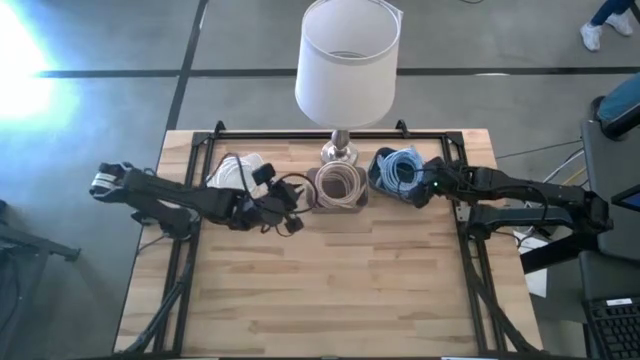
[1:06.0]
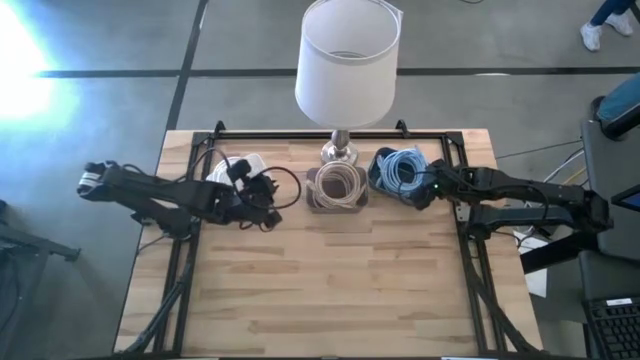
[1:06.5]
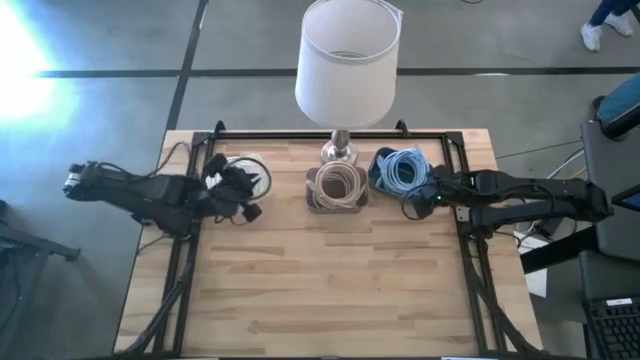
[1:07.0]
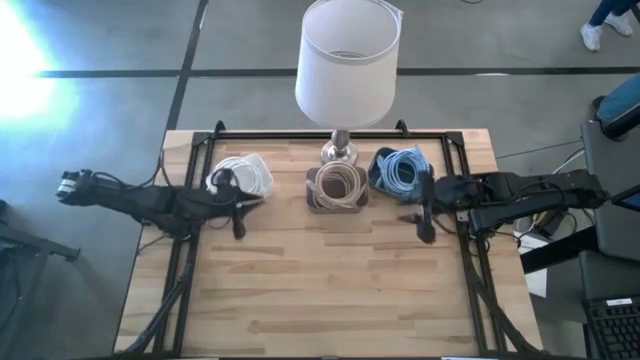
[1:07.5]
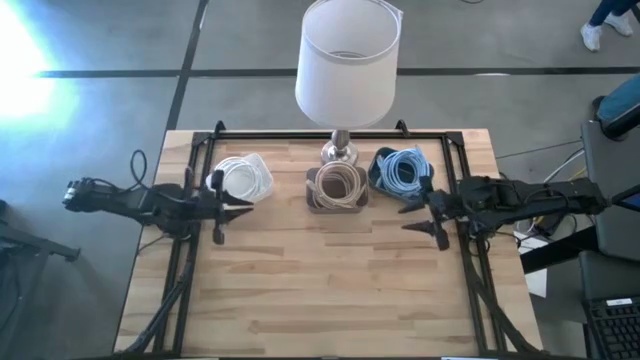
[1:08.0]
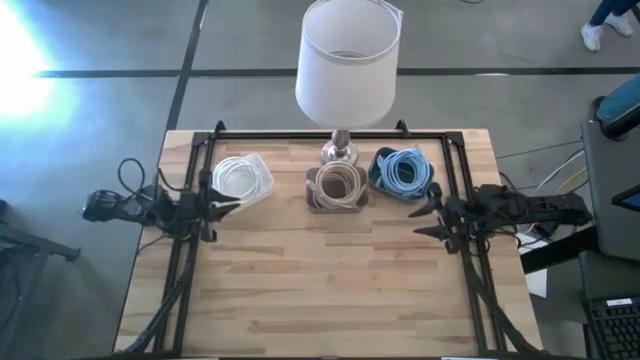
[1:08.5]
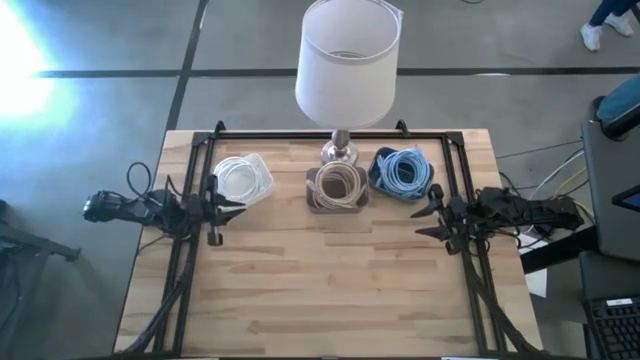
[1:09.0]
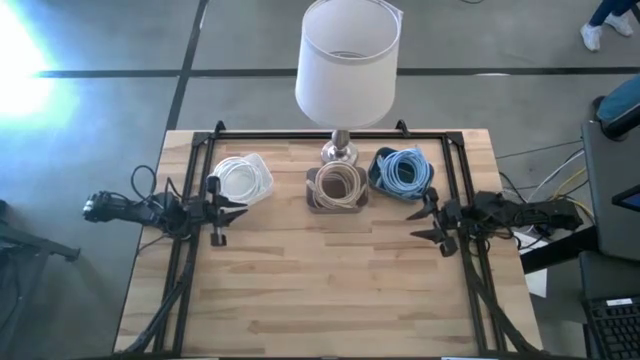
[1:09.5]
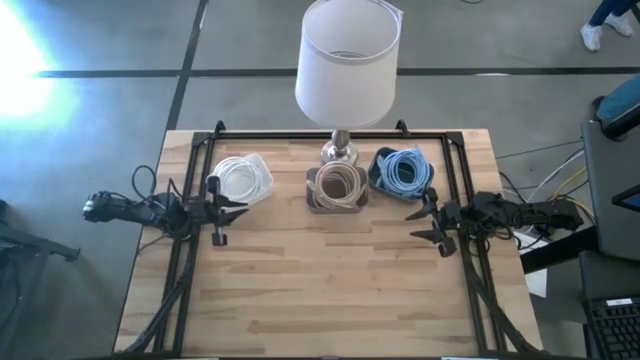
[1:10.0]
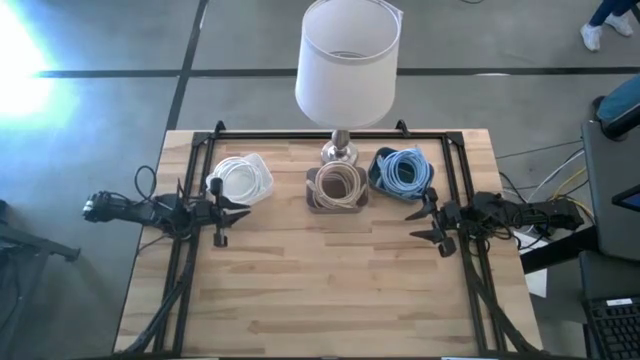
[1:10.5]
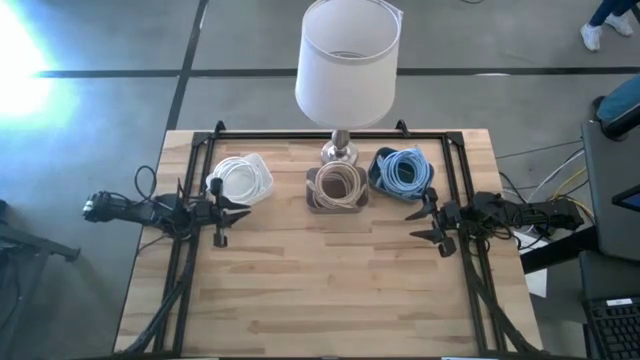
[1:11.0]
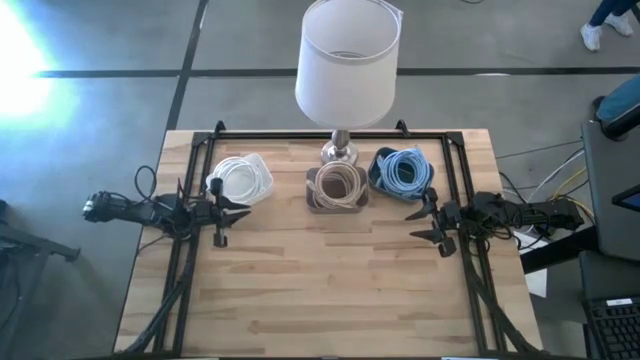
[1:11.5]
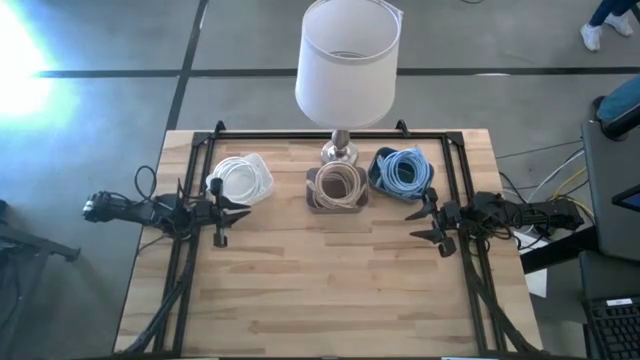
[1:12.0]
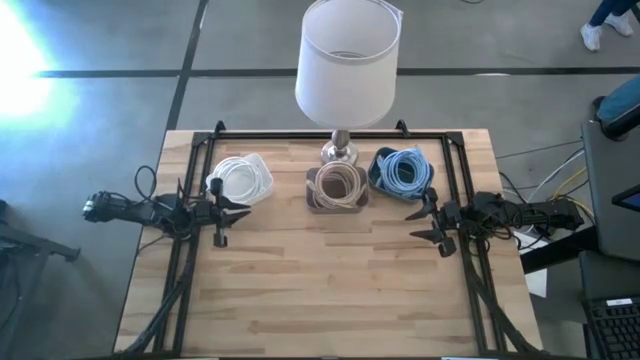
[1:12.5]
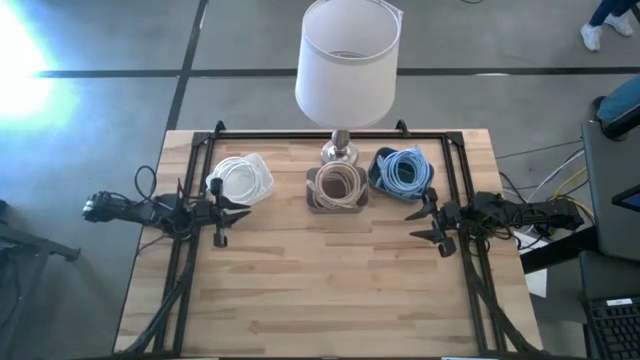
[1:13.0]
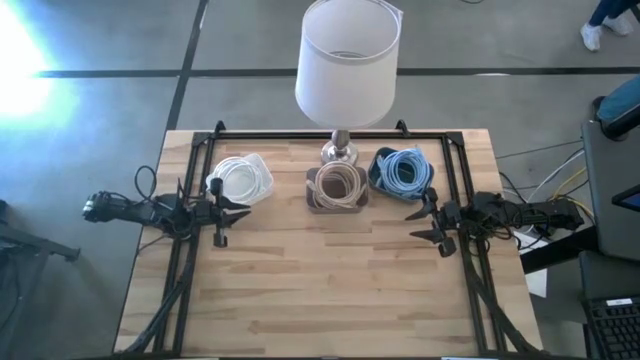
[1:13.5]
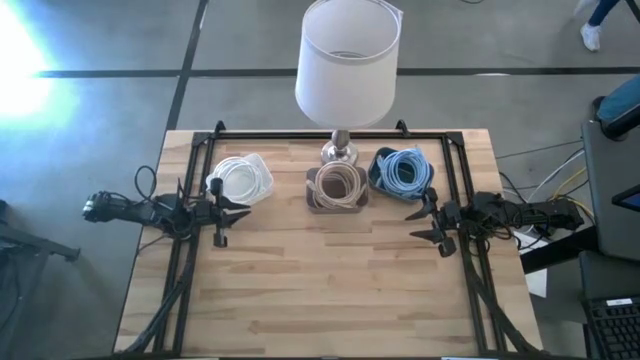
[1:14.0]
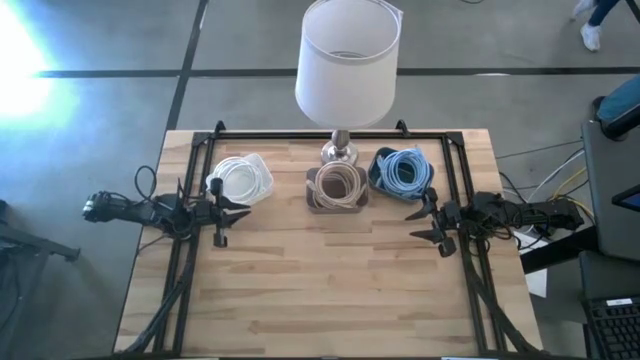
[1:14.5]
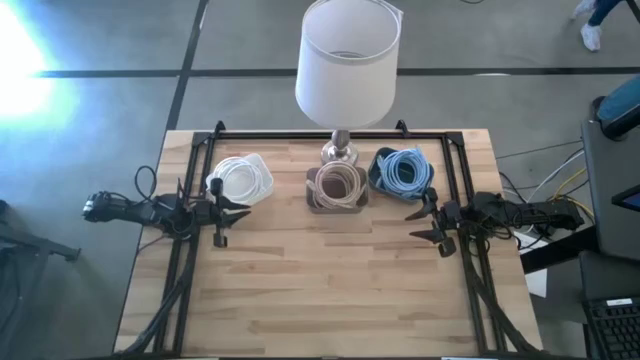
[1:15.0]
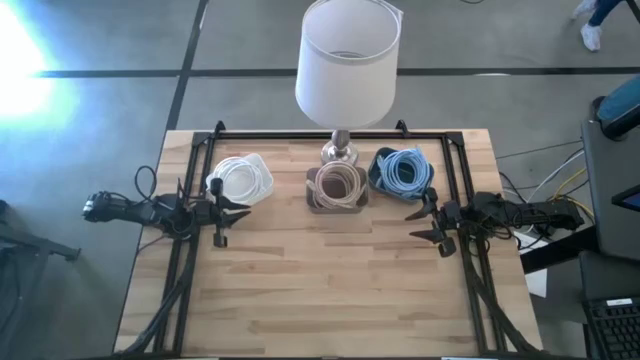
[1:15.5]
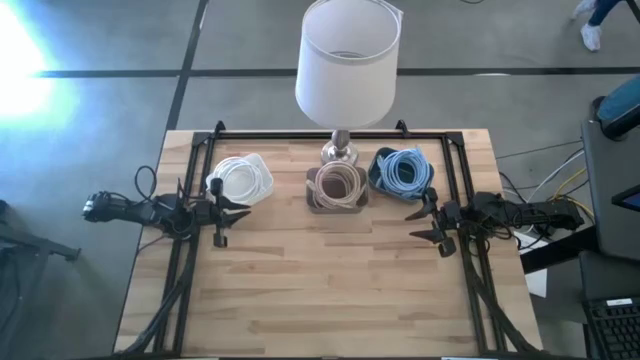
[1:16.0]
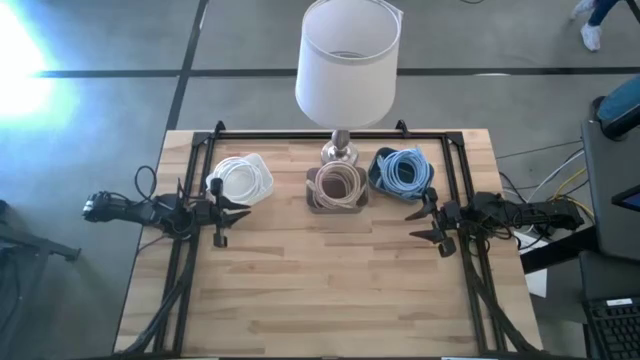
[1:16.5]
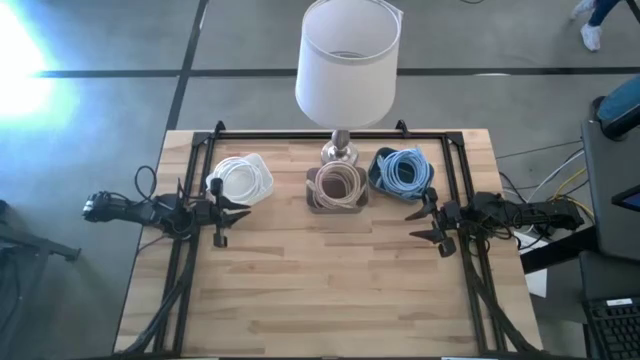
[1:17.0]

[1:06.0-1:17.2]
Task: Sort HDMI cables
Return to Home Position

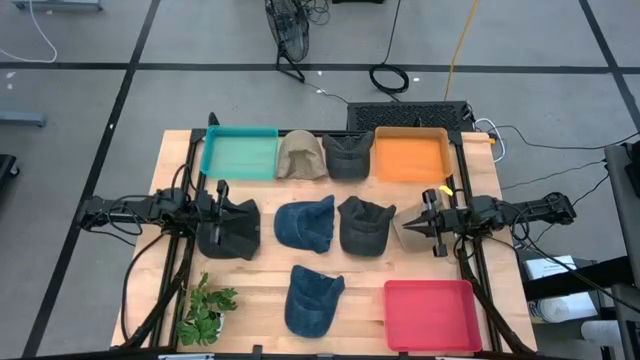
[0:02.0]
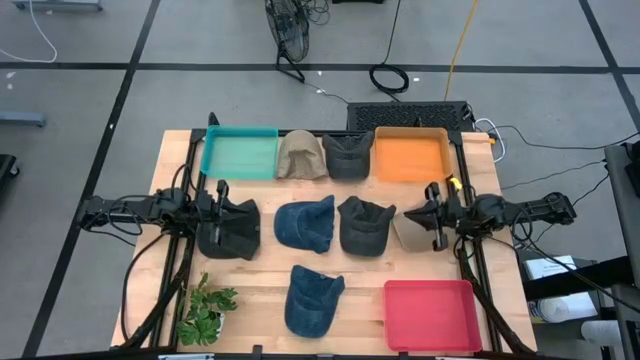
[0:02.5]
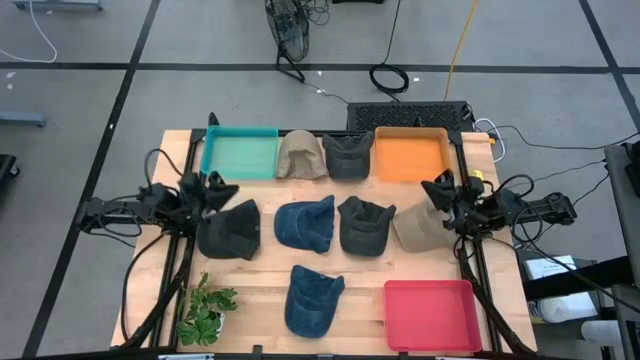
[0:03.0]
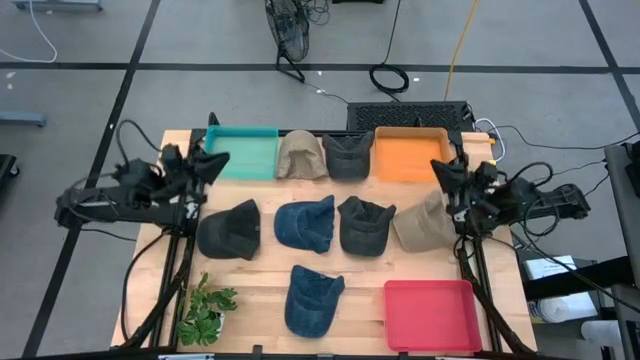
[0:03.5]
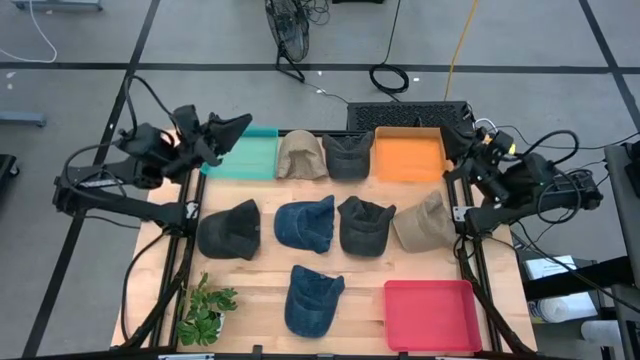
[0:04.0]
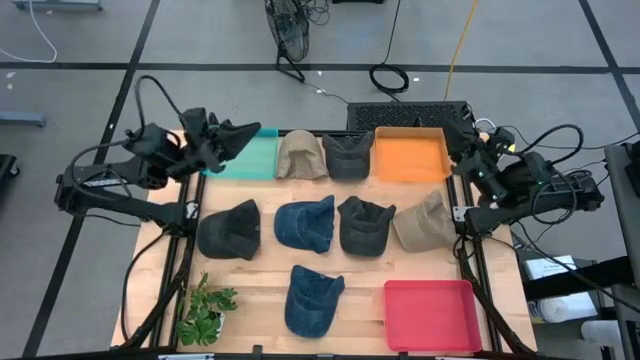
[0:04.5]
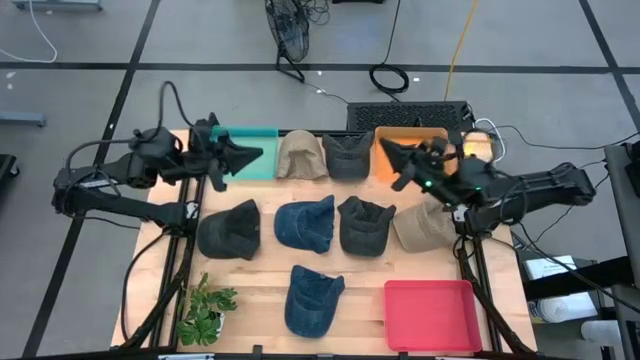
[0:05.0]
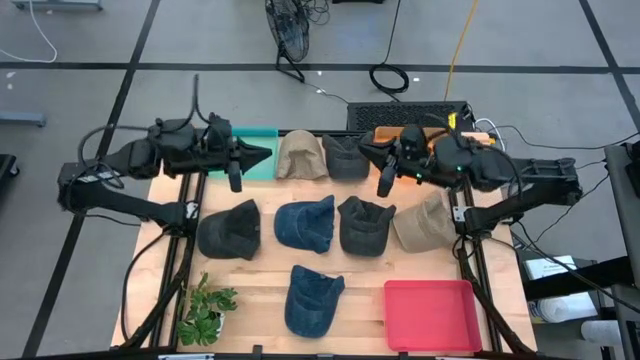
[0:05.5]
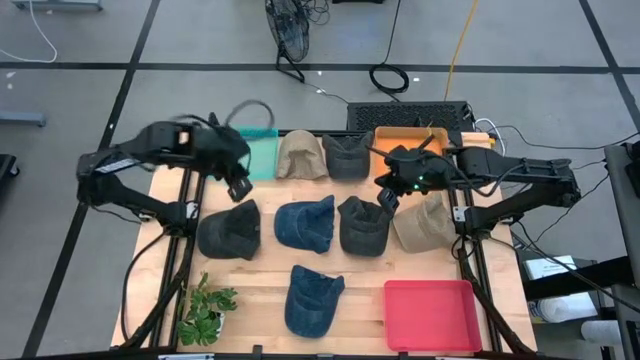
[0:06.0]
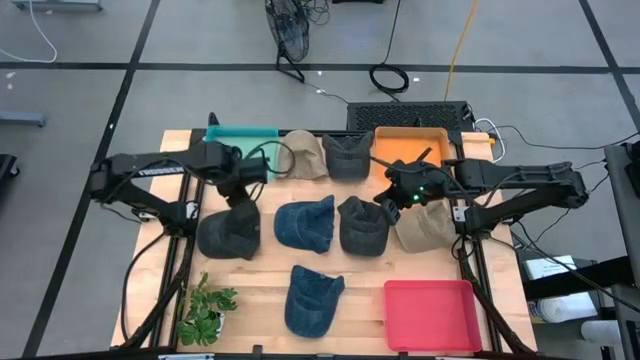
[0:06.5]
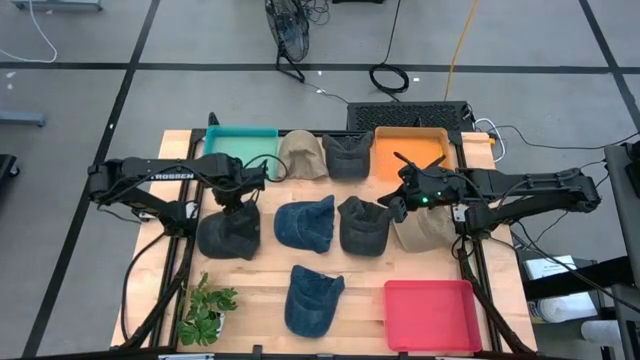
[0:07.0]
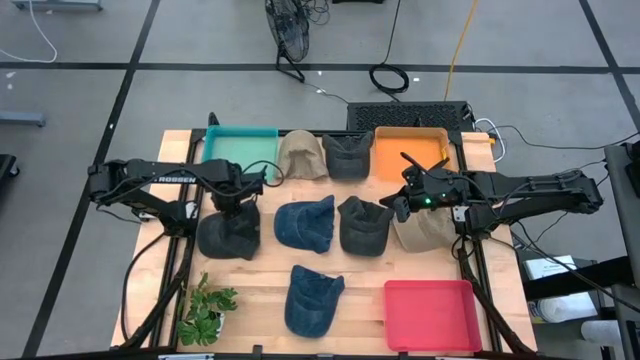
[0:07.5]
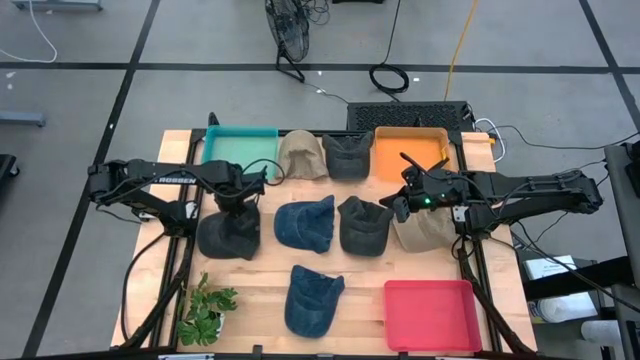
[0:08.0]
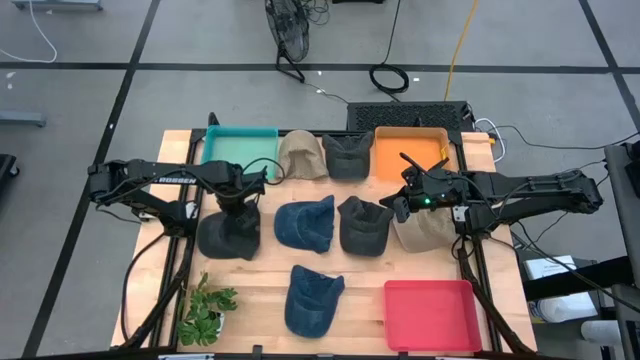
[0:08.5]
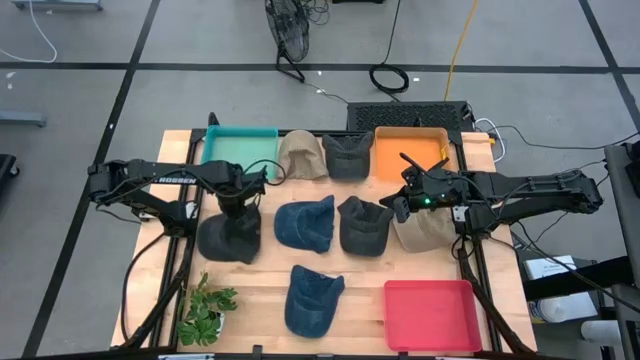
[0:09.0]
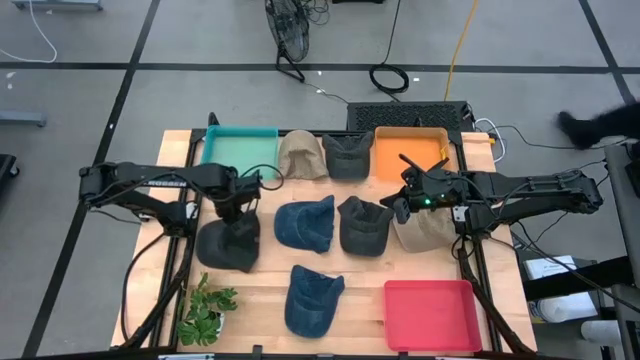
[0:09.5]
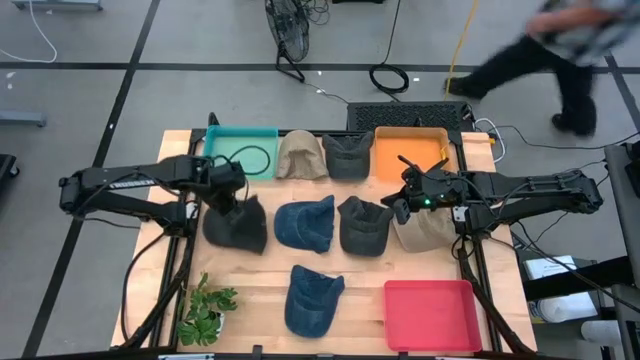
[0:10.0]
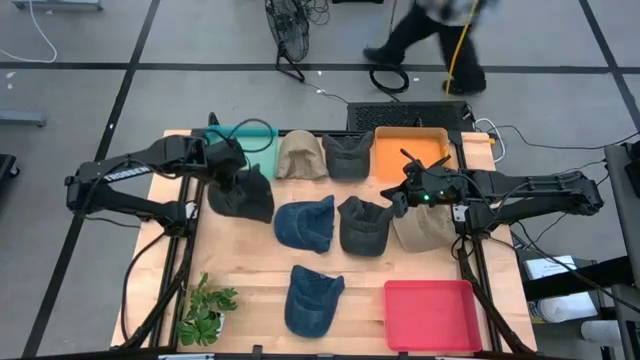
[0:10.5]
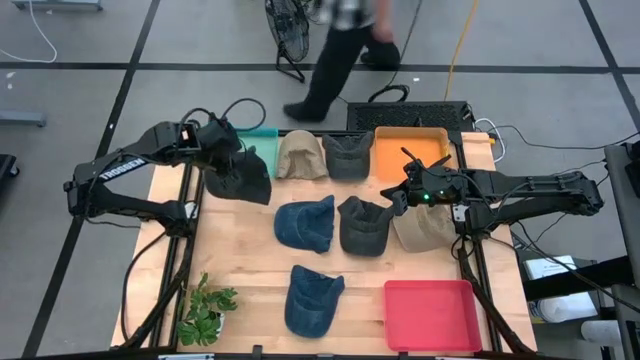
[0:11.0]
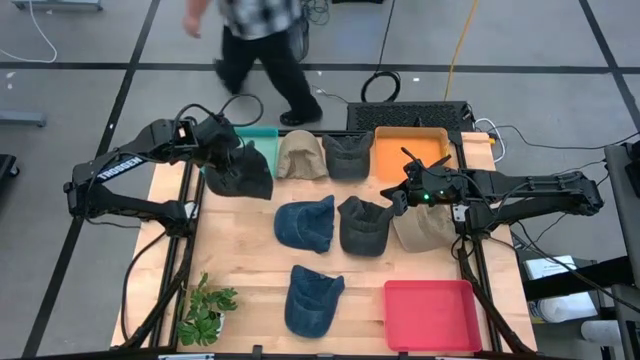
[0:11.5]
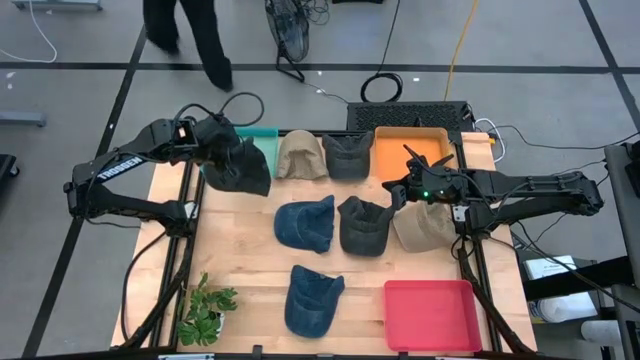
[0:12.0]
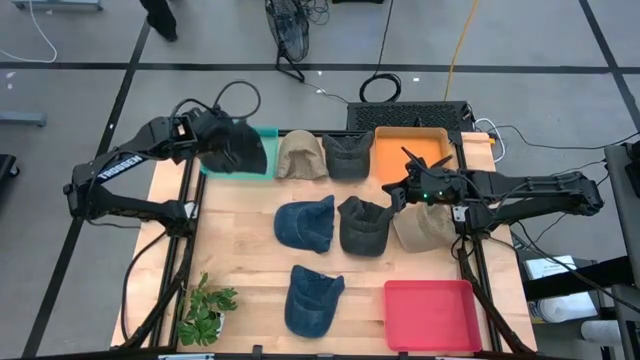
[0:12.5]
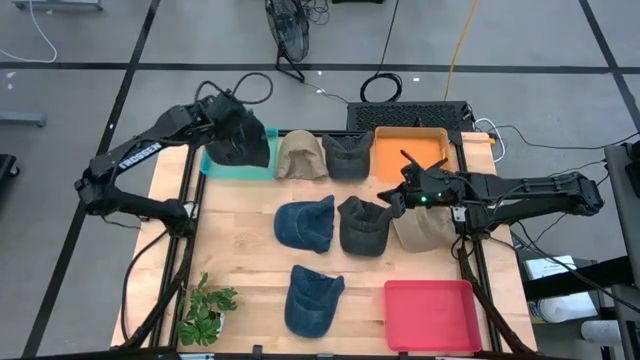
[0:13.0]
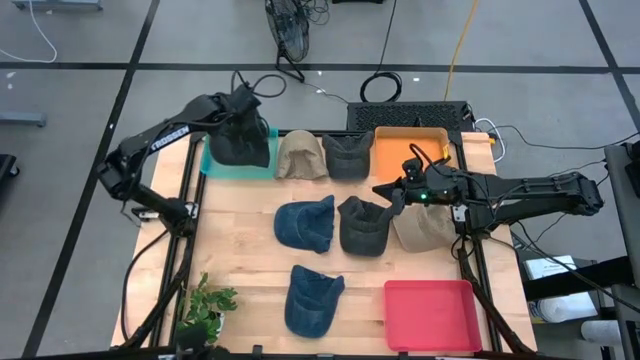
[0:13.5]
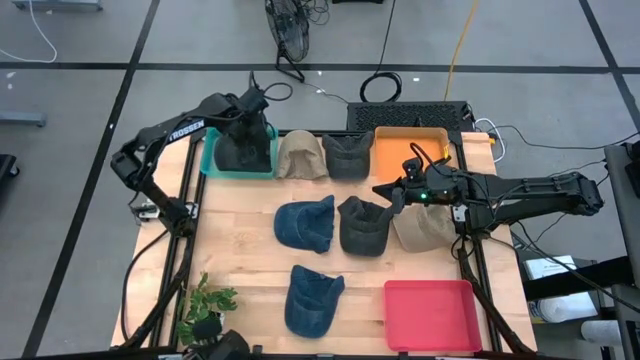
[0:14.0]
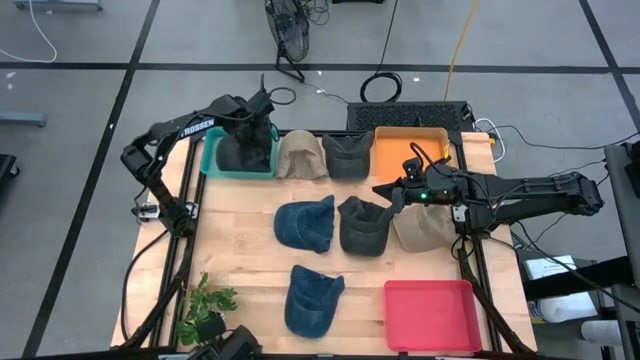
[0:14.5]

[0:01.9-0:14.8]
Task: Pick & Place hat
Put the bottom left black cap into the green bin
